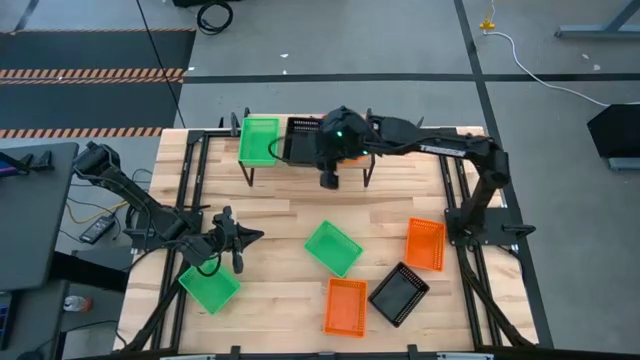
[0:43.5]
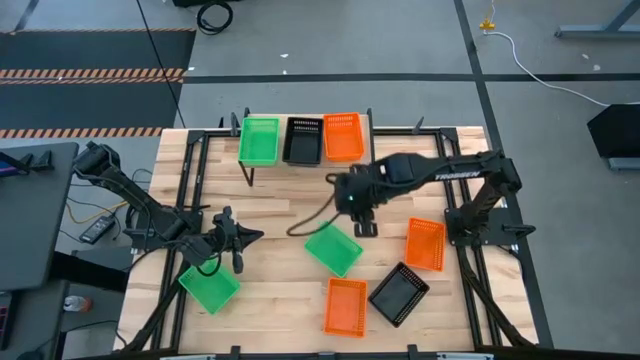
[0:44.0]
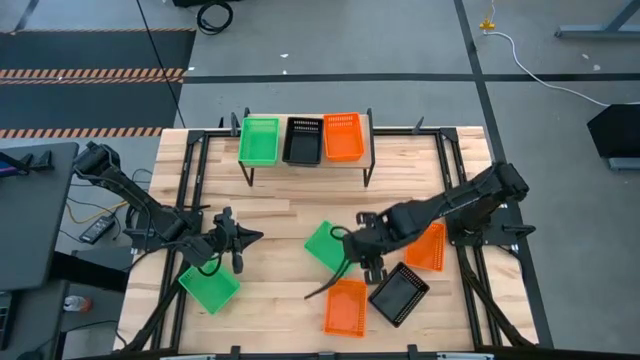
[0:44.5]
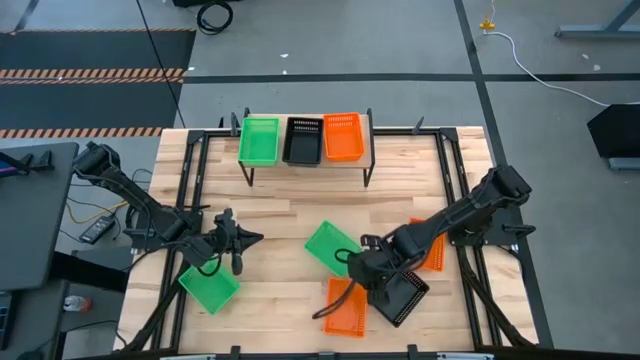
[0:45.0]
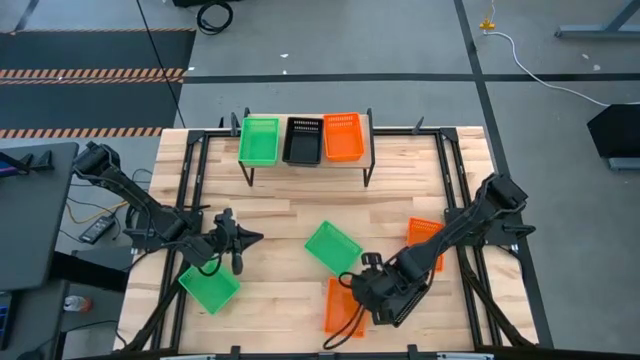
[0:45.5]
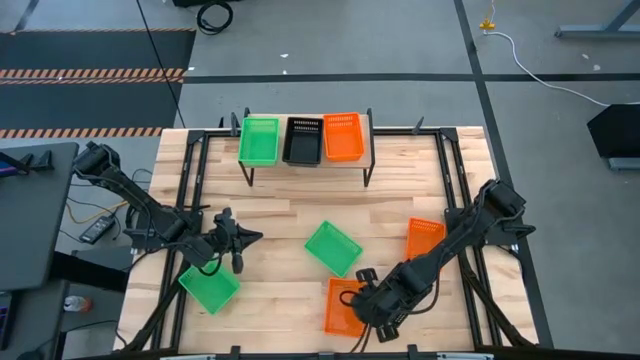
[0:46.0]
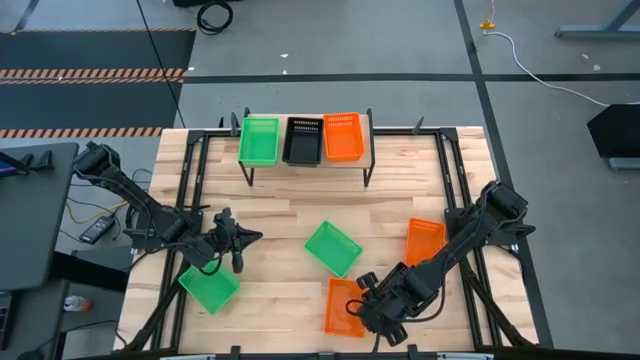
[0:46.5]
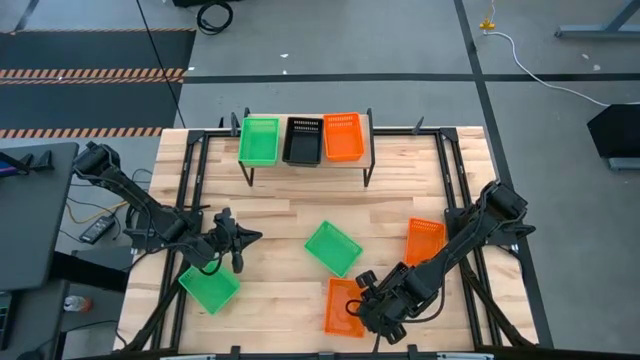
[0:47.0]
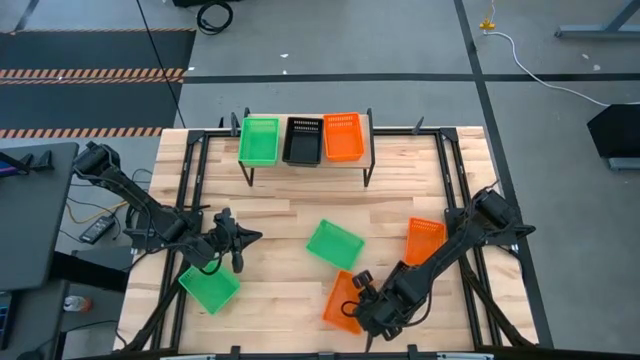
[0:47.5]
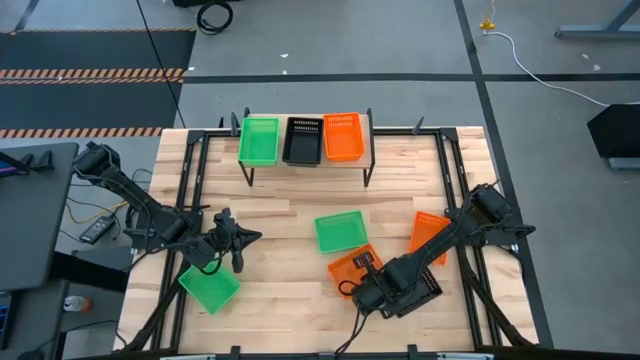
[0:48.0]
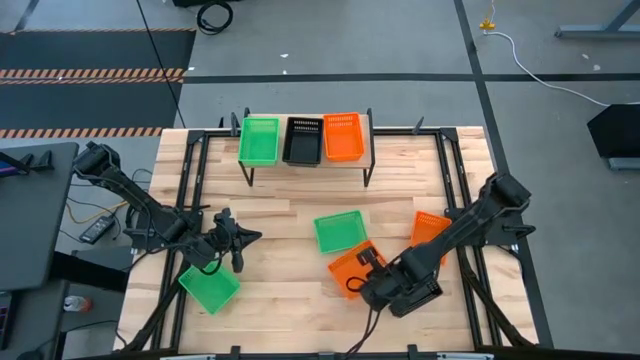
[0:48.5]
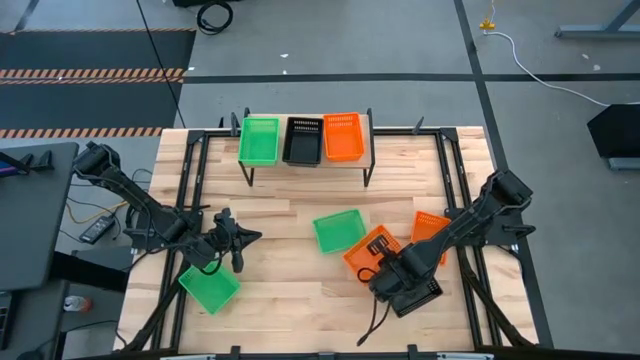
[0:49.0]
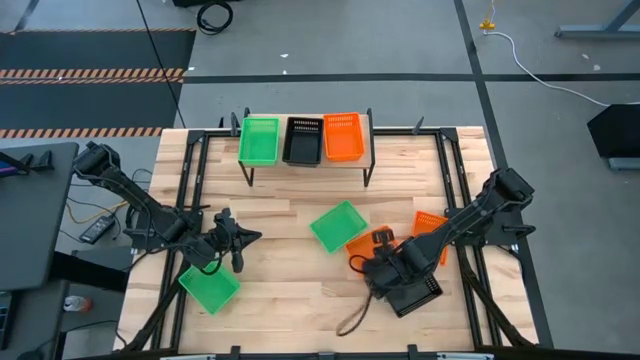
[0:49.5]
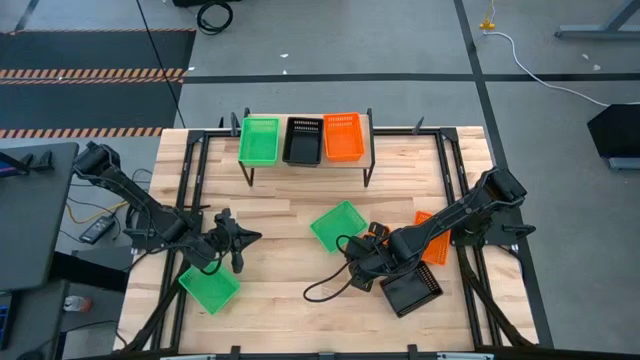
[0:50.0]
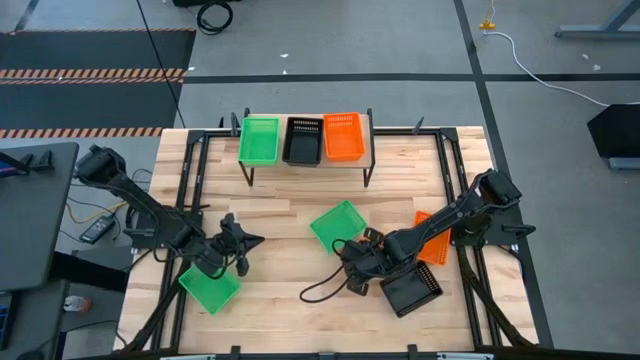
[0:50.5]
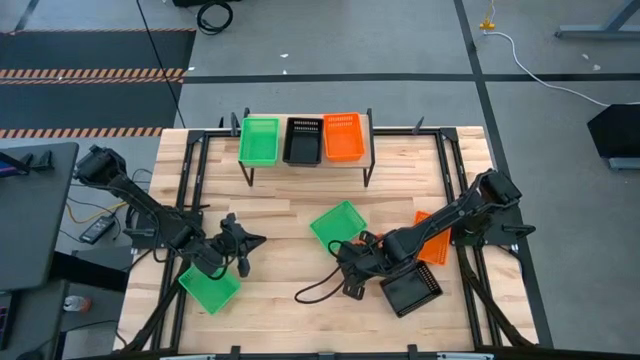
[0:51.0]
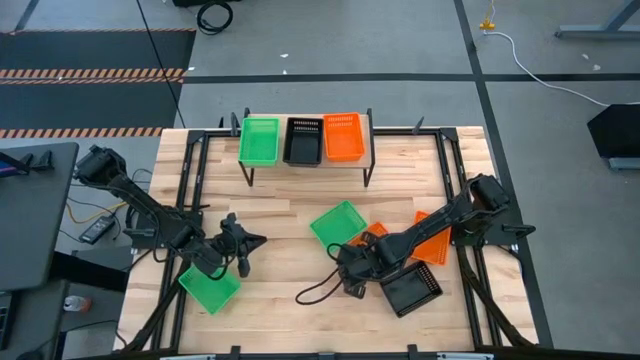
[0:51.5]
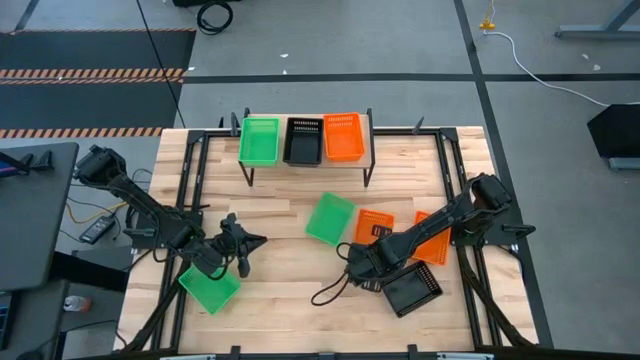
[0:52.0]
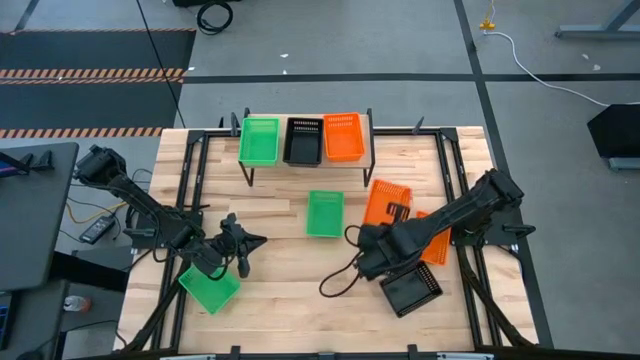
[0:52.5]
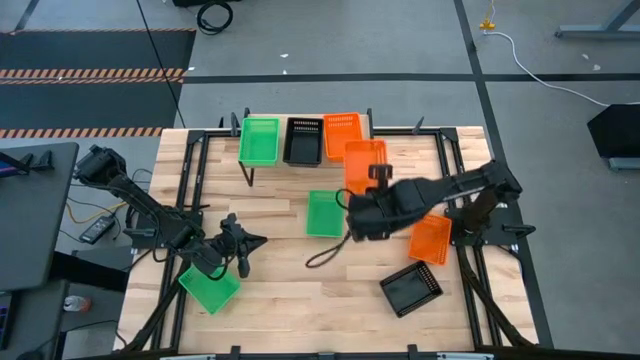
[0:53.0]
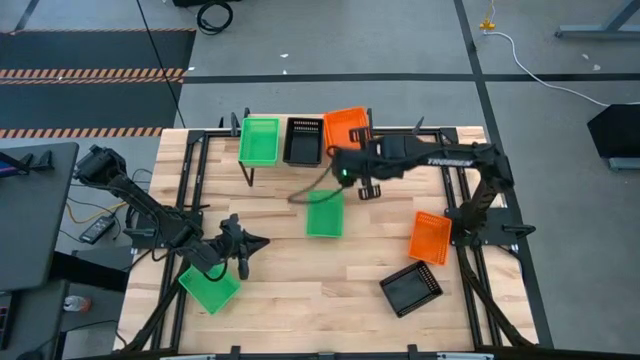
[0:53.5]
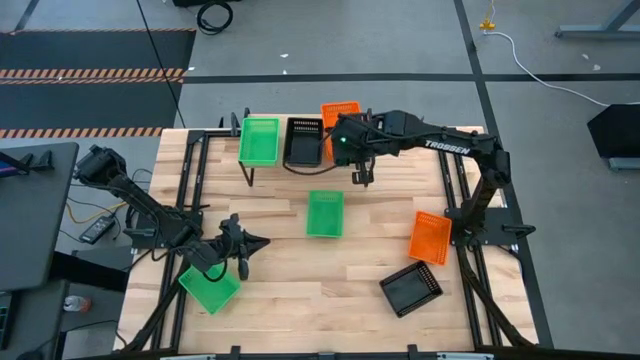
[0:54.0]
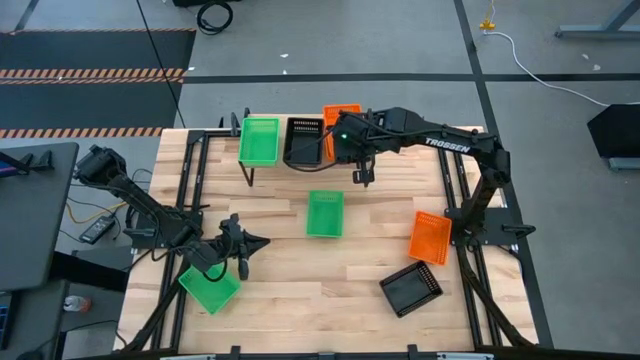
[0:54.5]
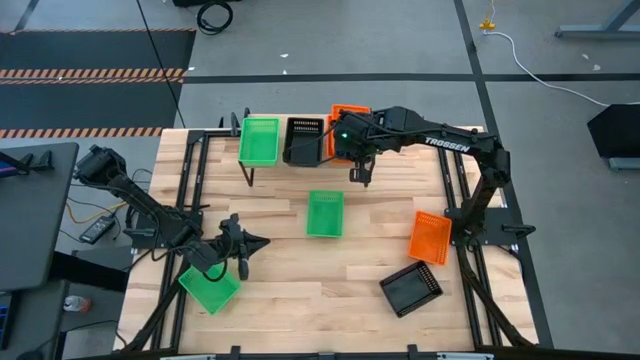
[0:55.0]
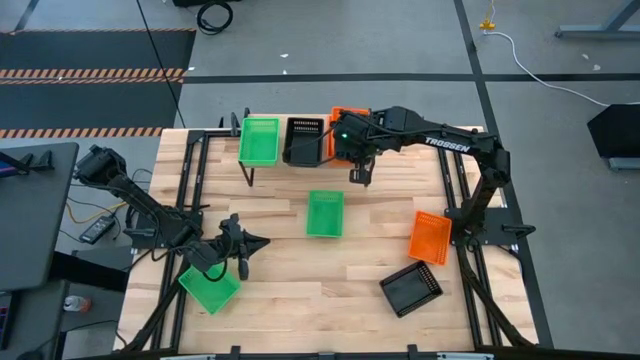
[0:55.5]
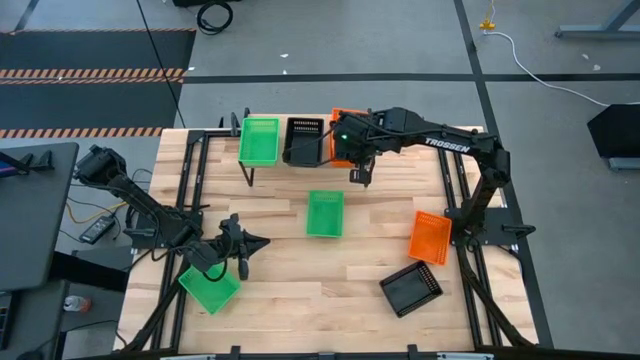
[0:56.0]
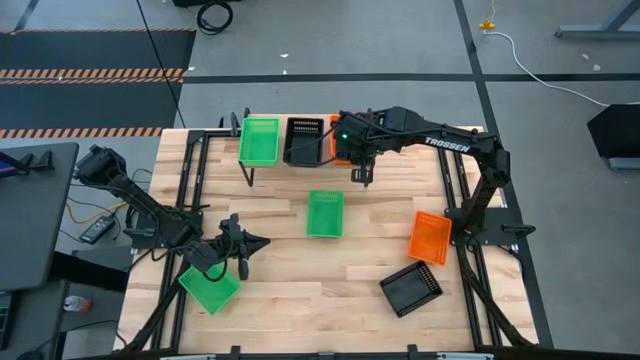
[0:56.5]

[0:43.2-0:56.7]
Task: Stack baskets on shelf by color
Stack the left orange bin on top of the orange bin on the shelf

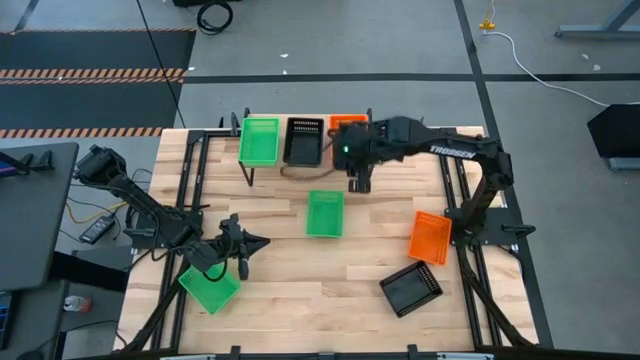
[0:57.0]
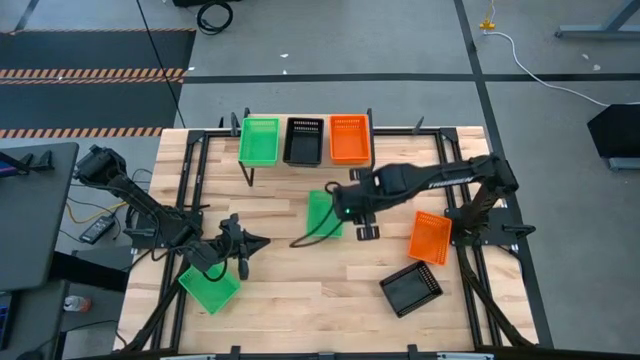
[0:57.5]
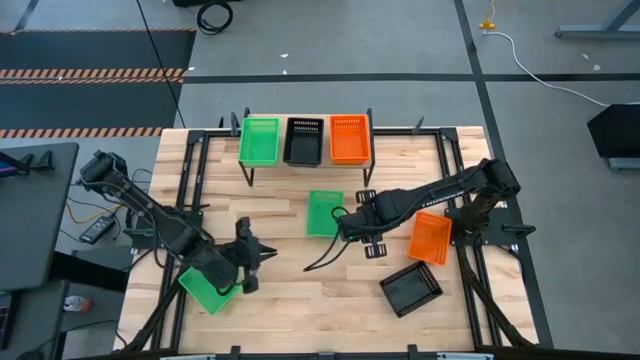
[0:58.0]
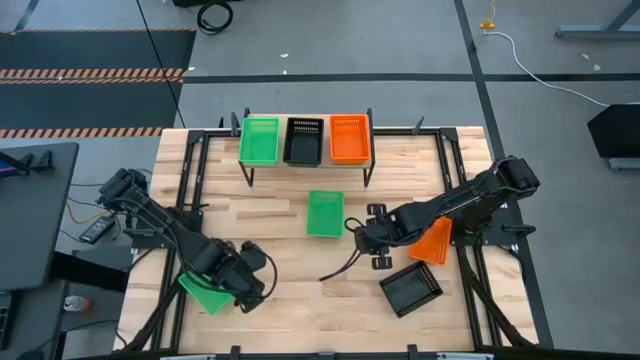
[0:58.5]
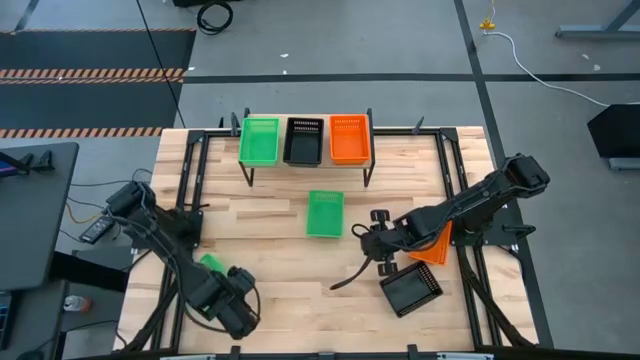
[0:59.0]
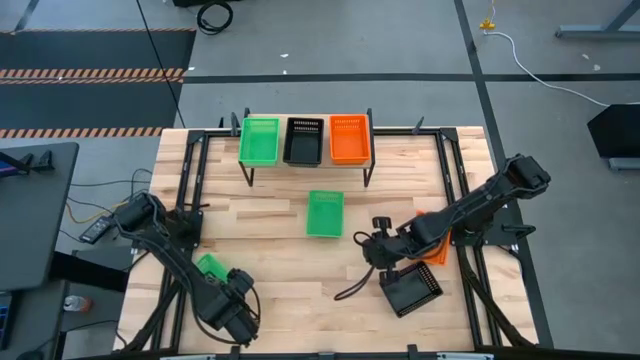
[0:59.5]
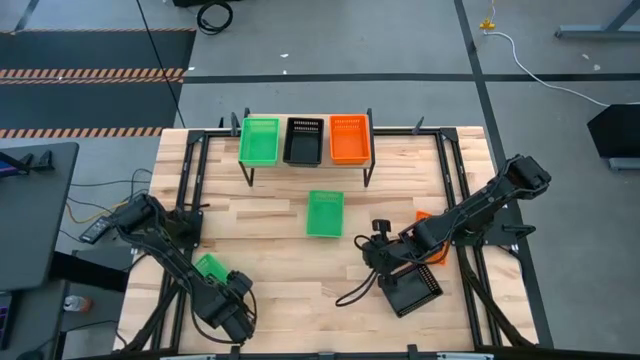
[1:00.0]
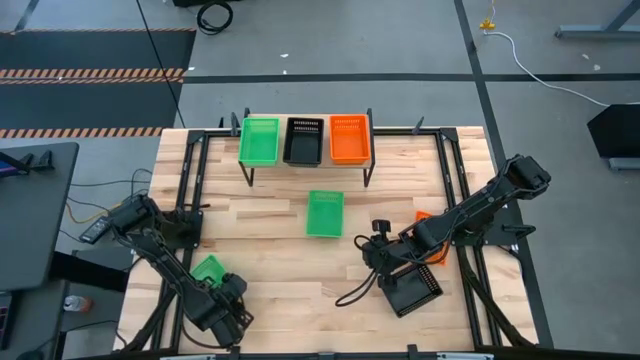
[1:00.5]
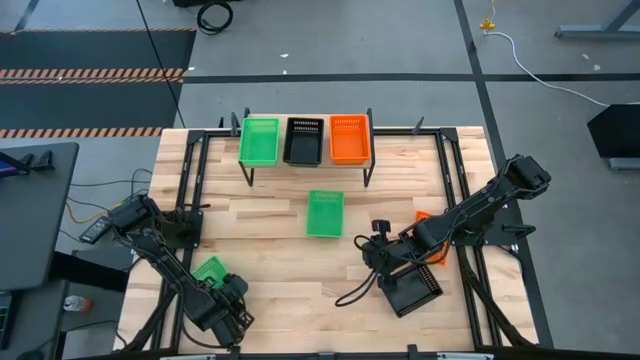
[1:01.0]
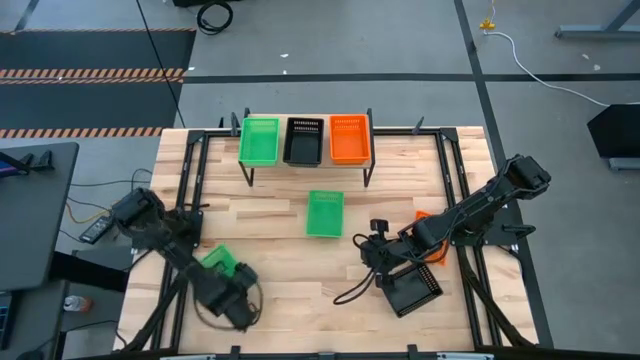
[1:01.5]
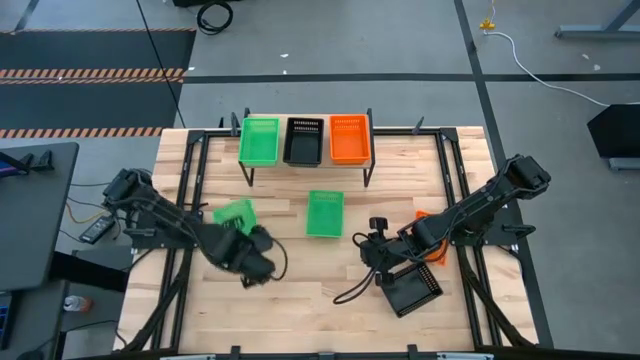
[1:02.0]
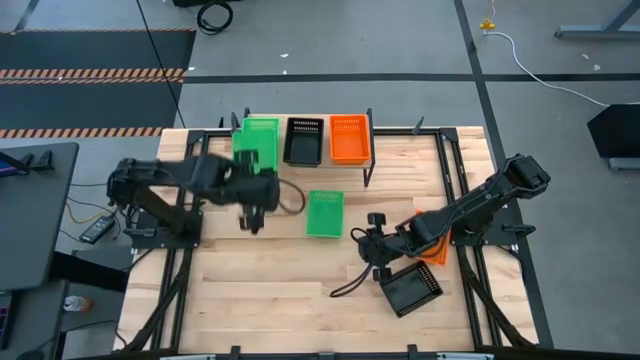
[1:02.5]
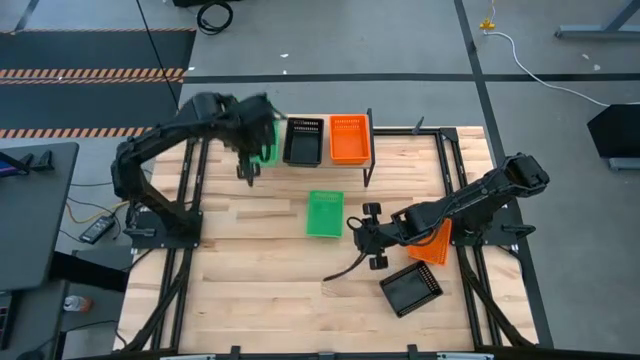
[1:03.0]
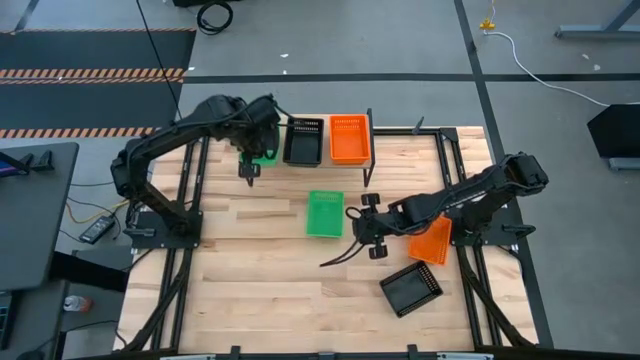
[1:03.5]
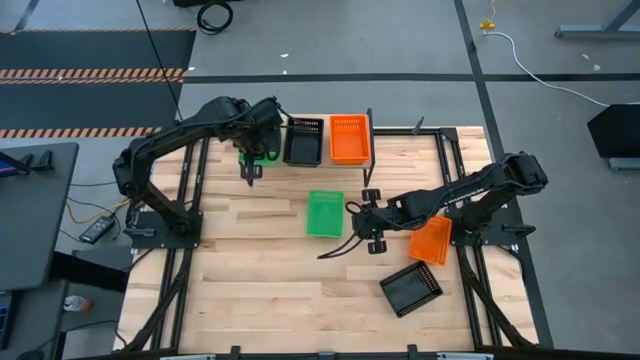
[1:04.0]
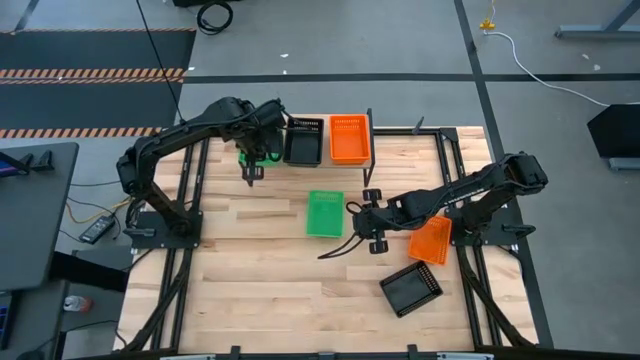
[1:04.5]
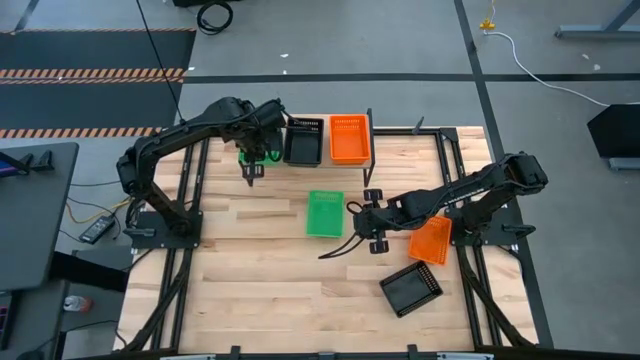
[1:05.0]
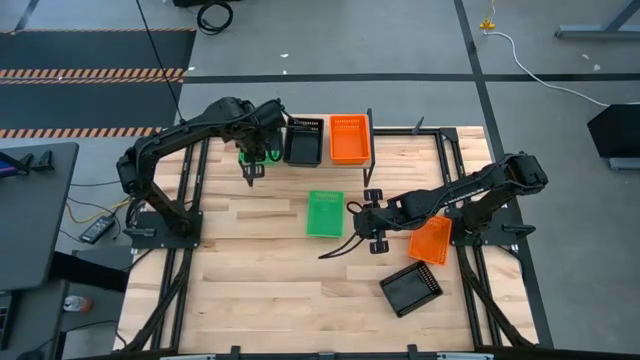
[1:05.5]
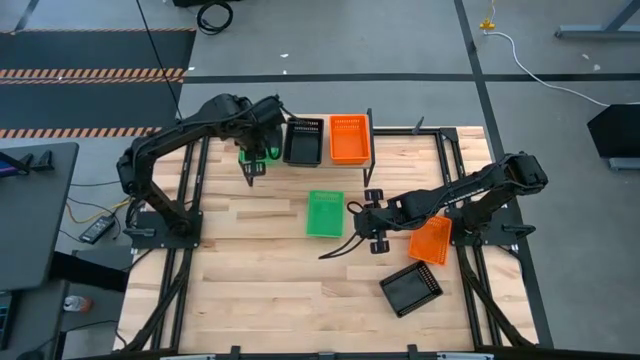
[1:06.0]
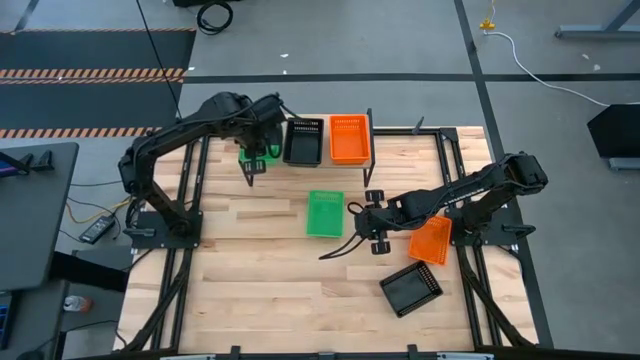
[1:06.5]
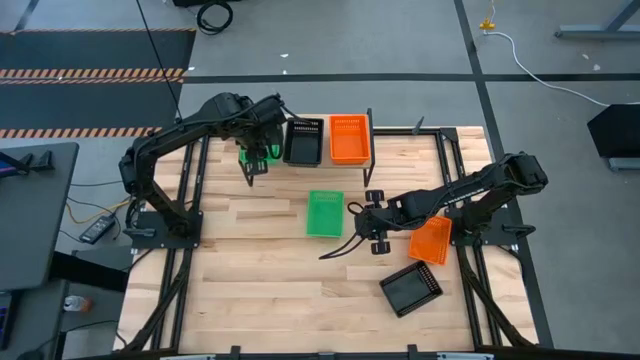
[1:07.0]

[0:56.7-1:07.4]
Stack the left green bin on top of the green bin on the shelf
